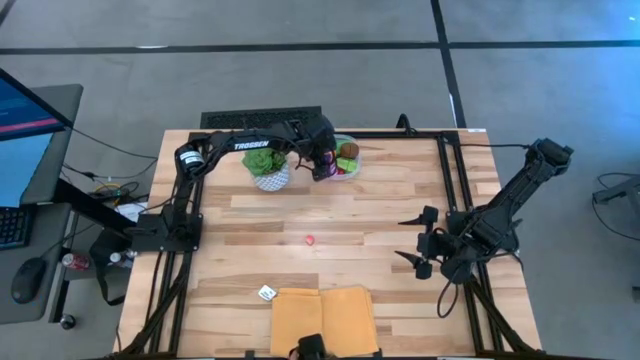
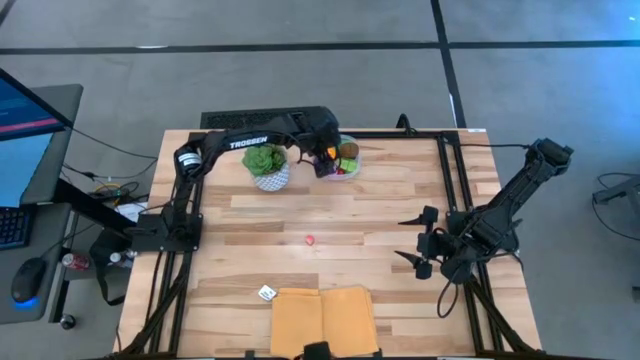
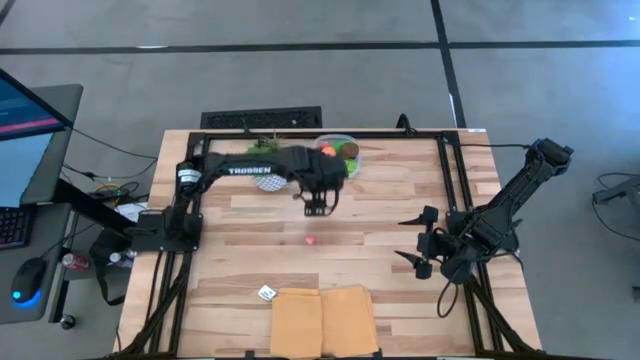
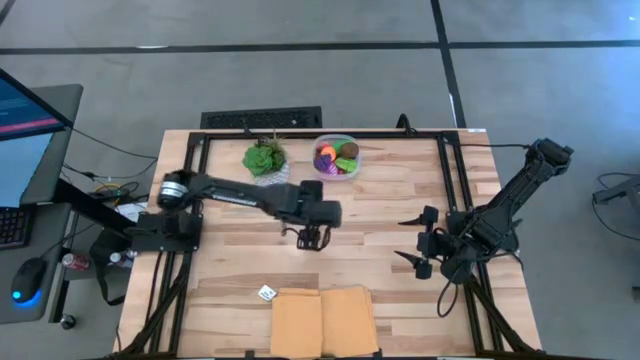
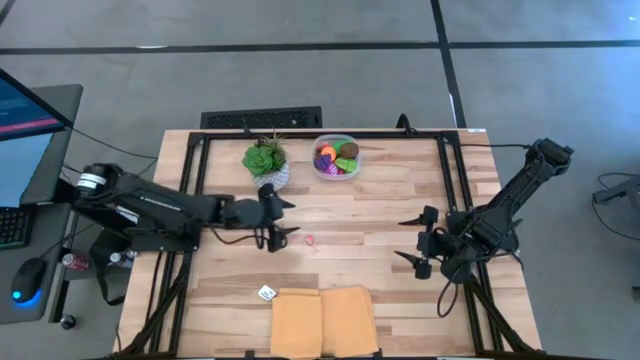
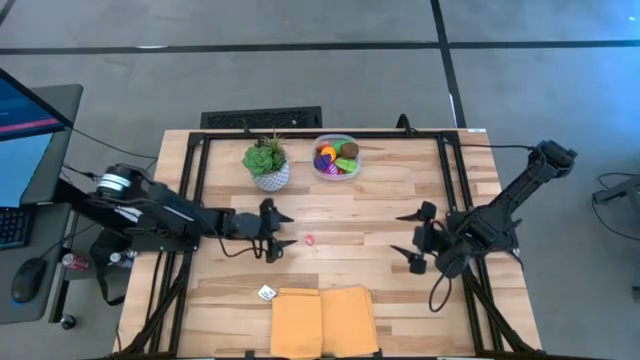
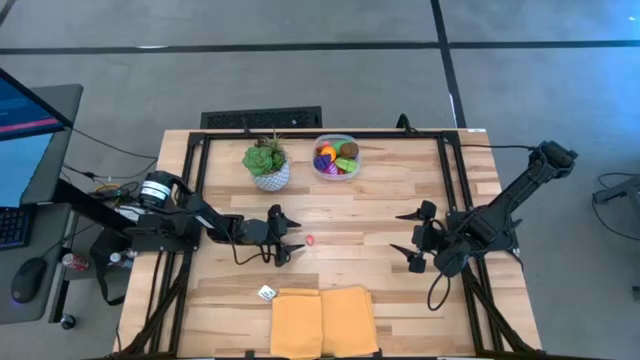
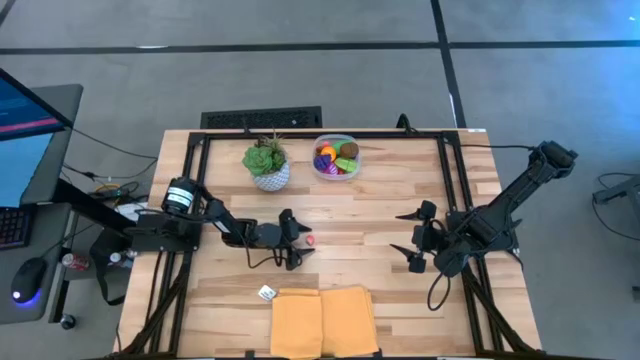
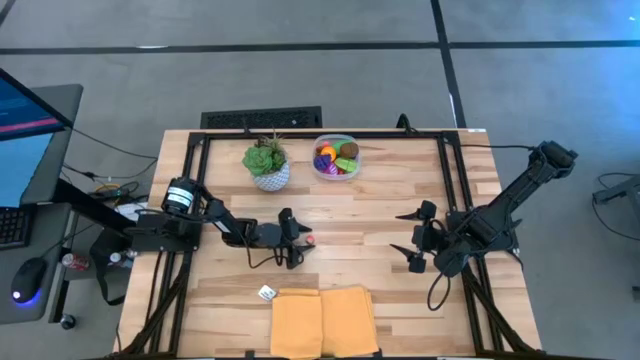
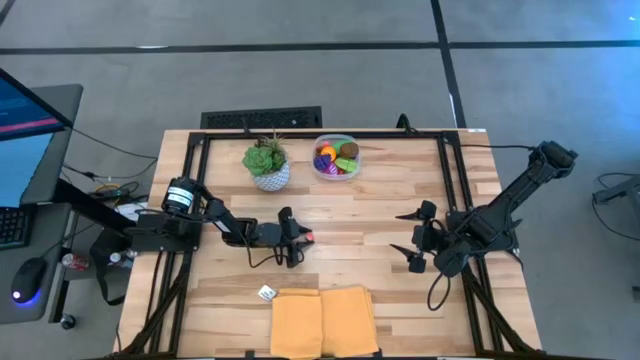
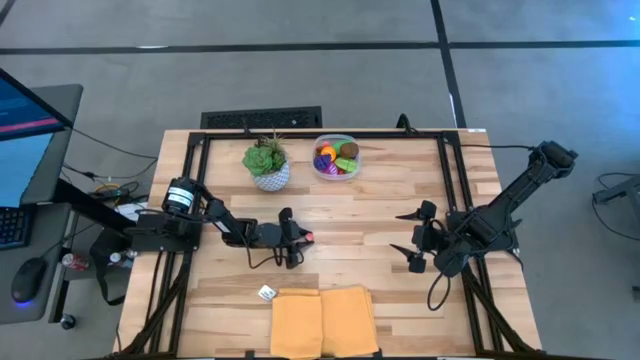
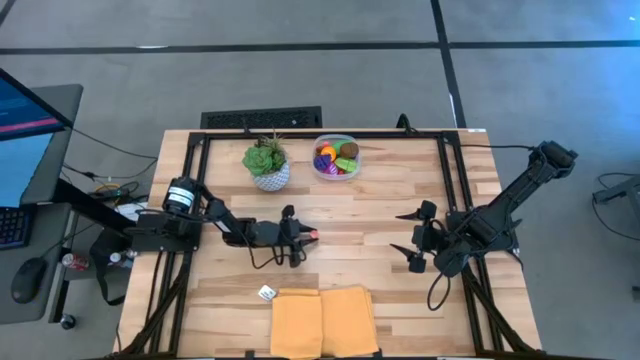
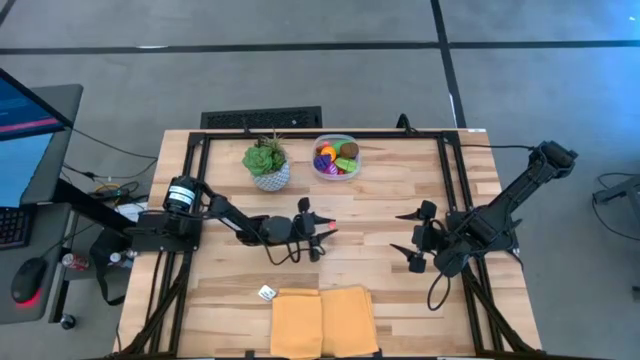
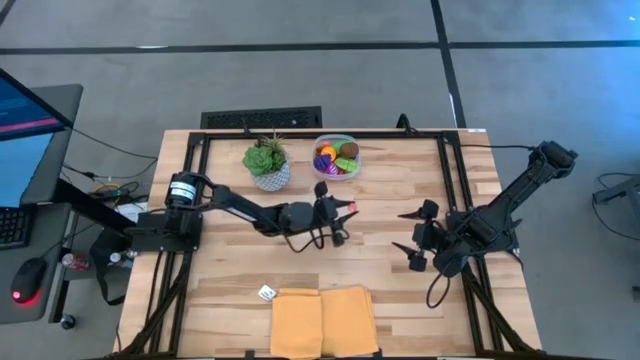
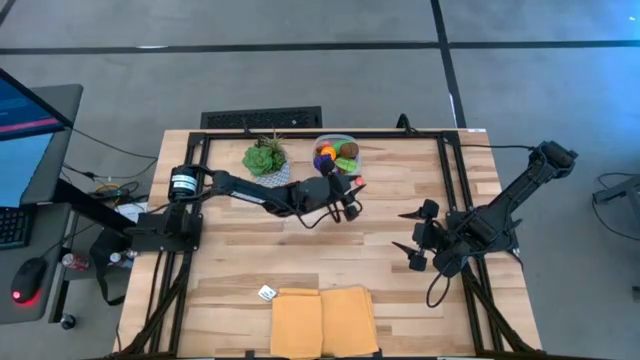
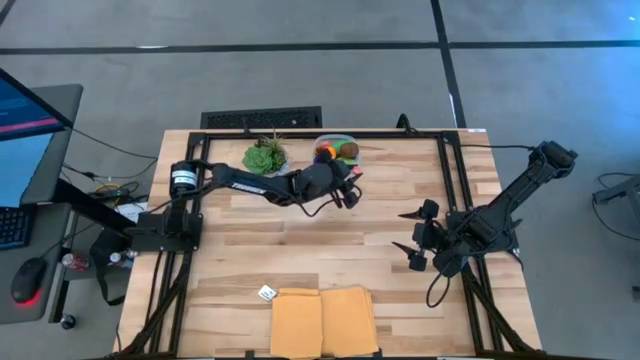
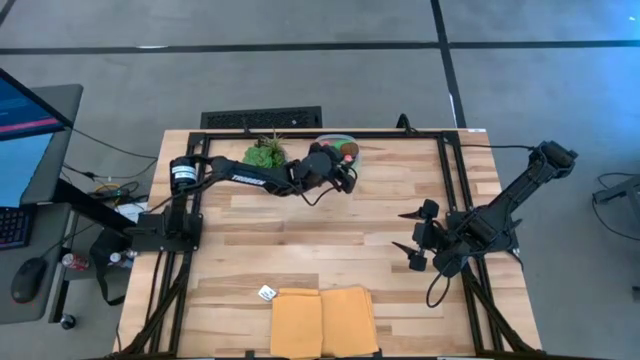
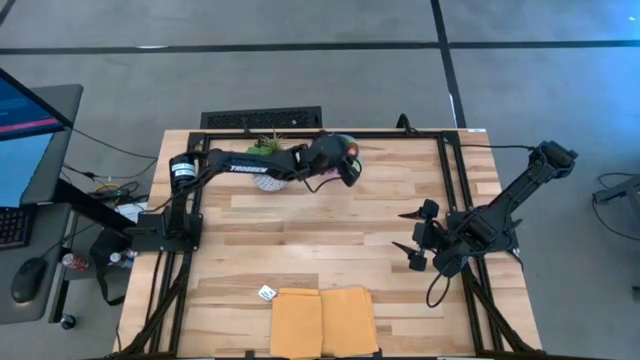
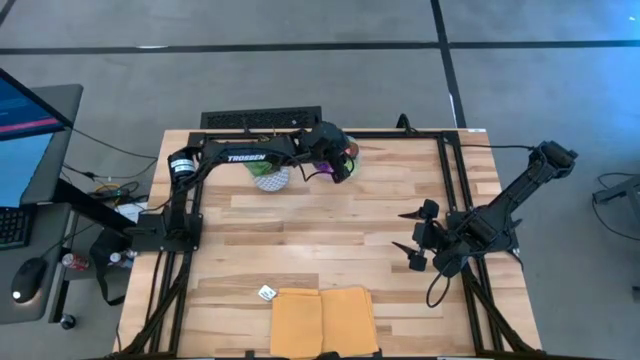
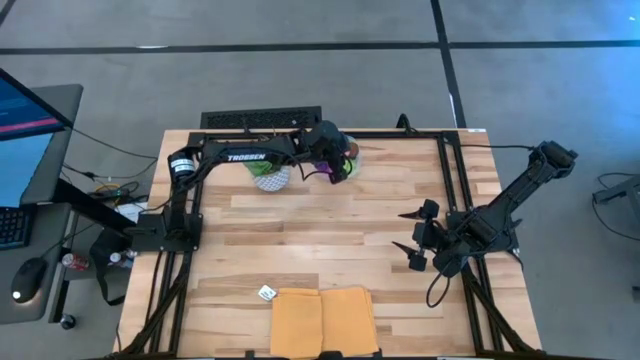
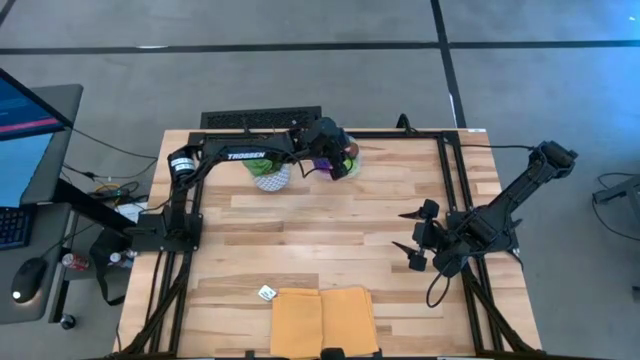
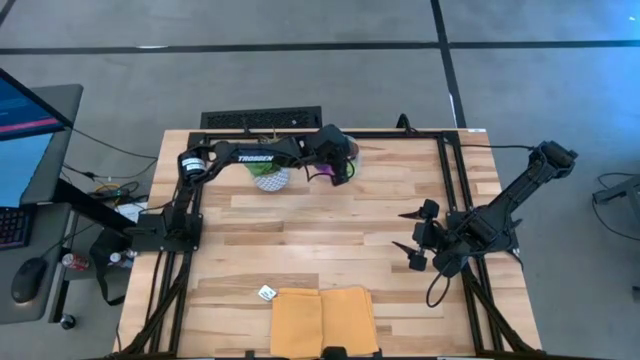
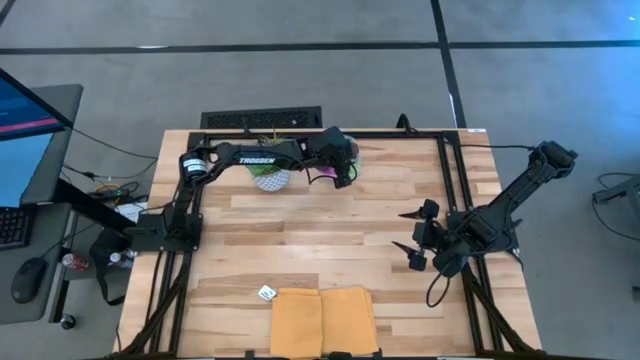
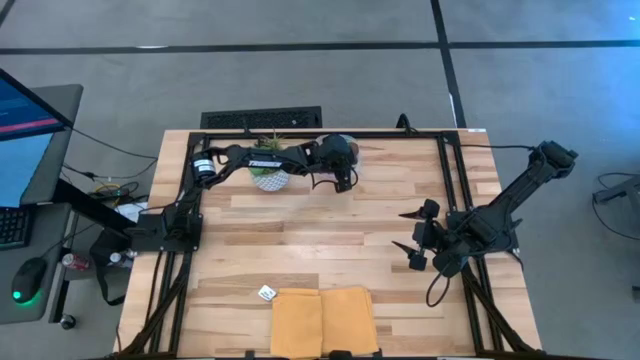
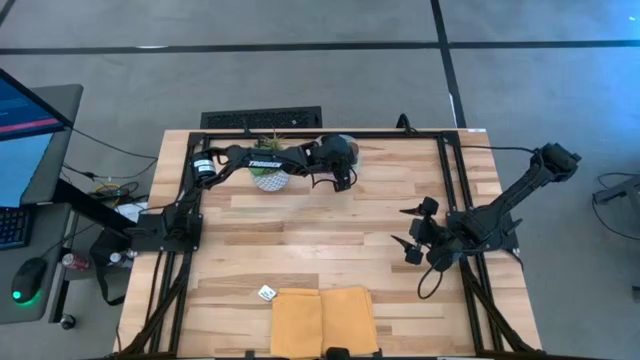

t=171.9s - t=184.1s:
Task: Pick and placing Produce into tupperware
Put the peach into the transparent bin

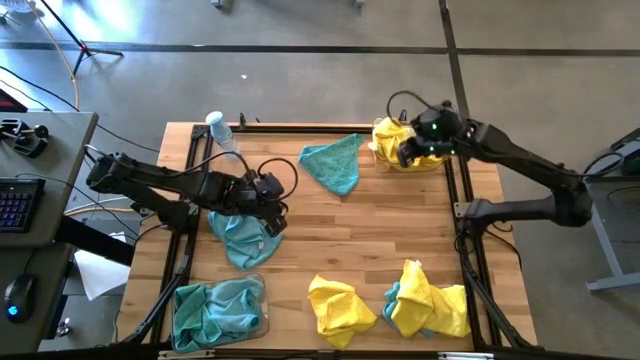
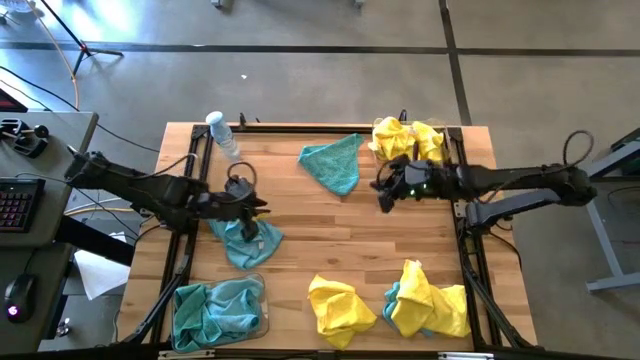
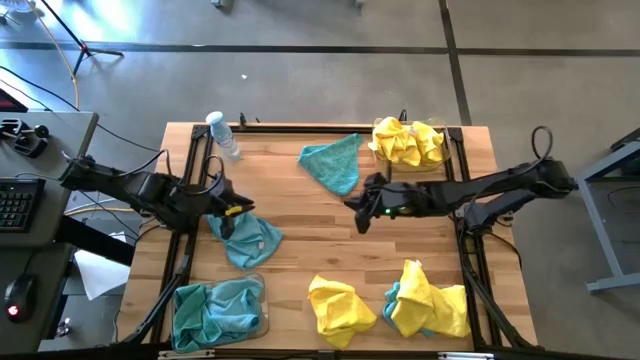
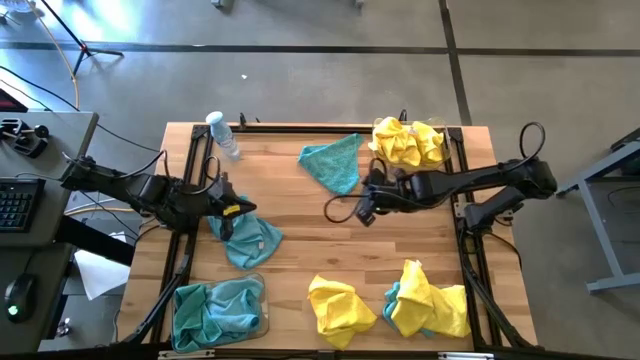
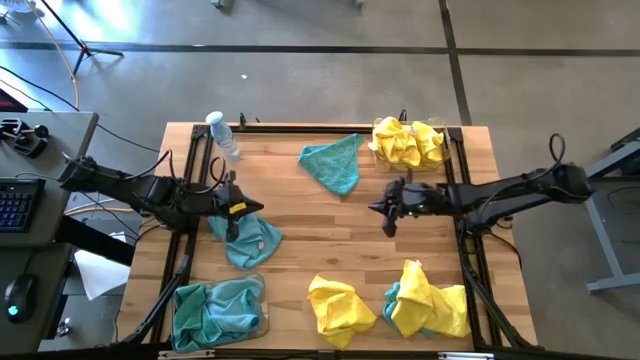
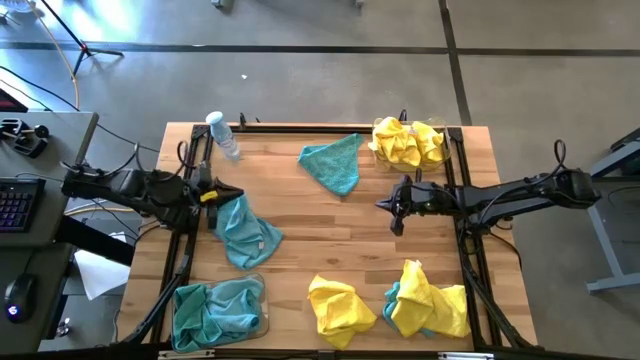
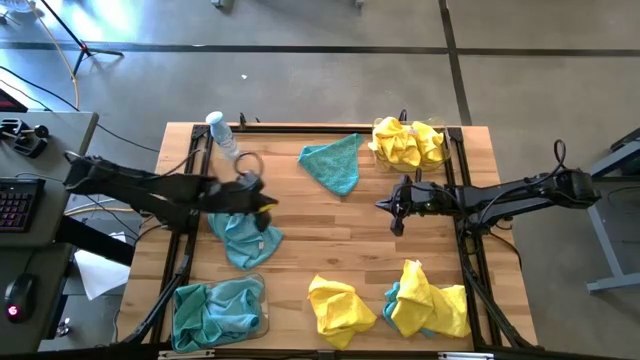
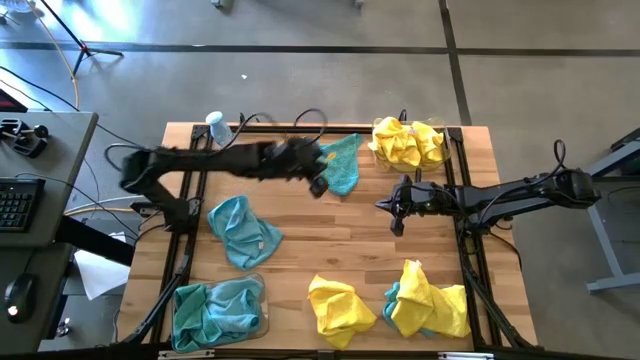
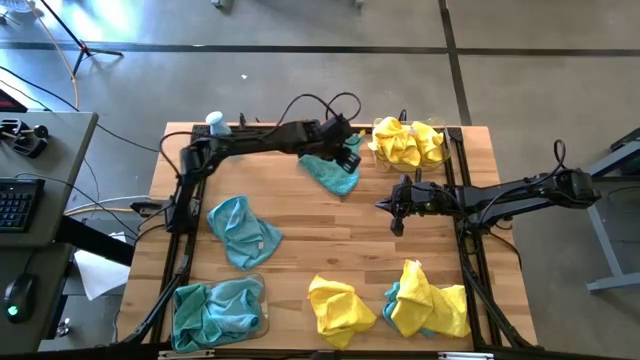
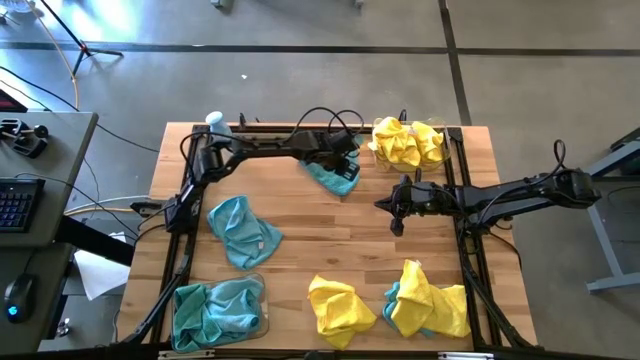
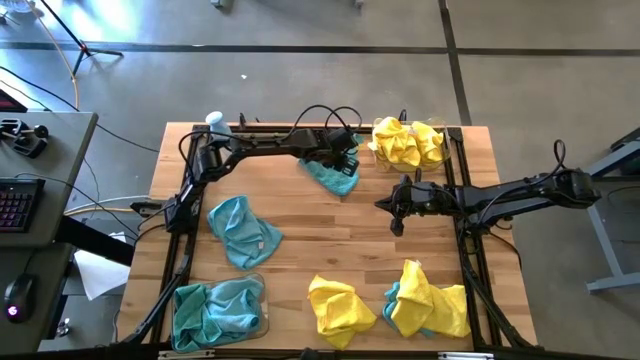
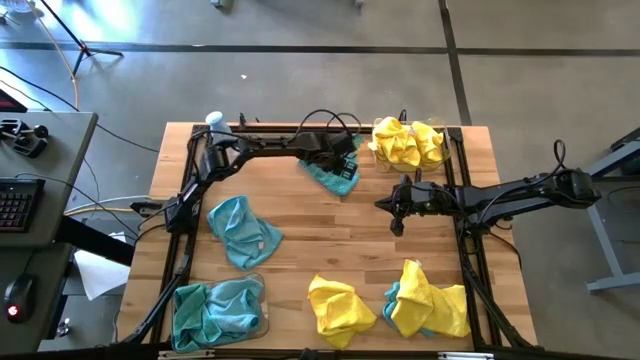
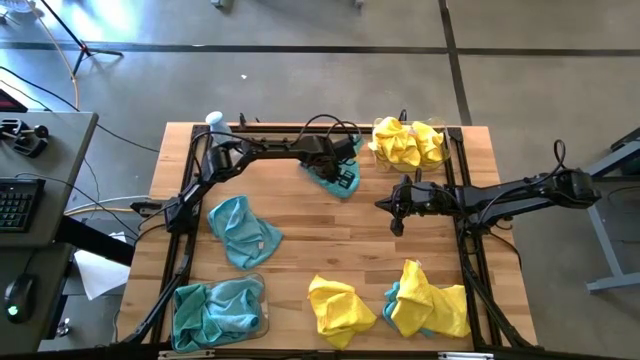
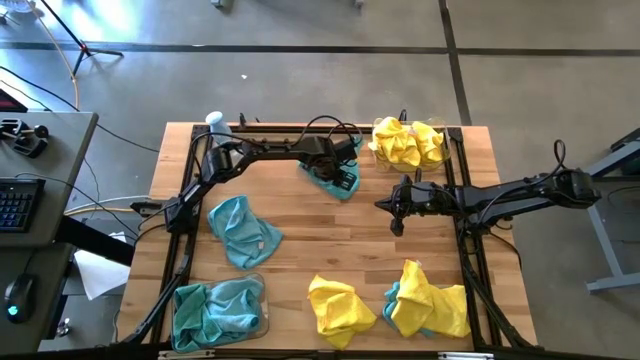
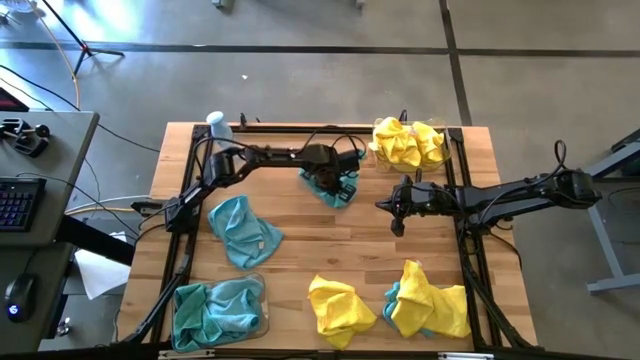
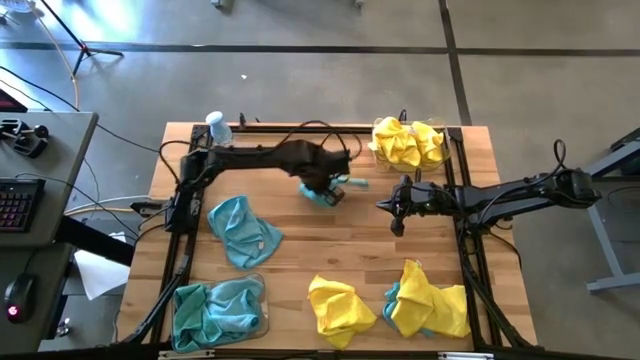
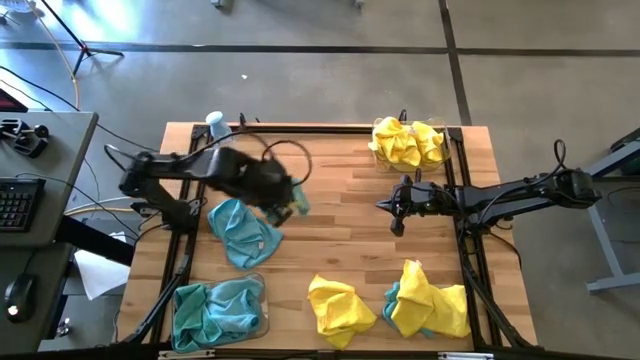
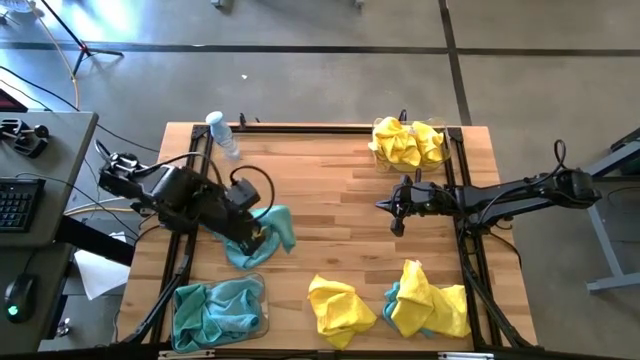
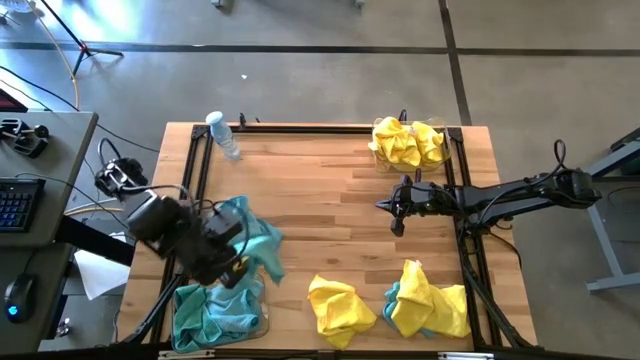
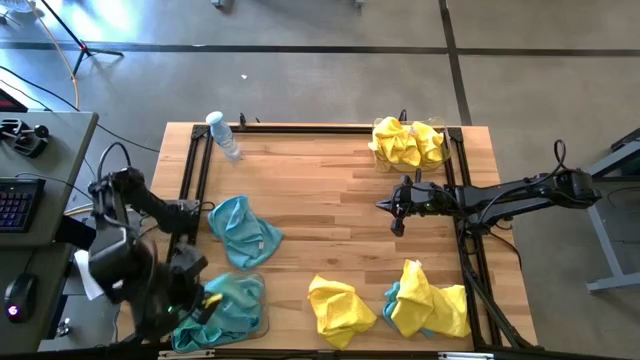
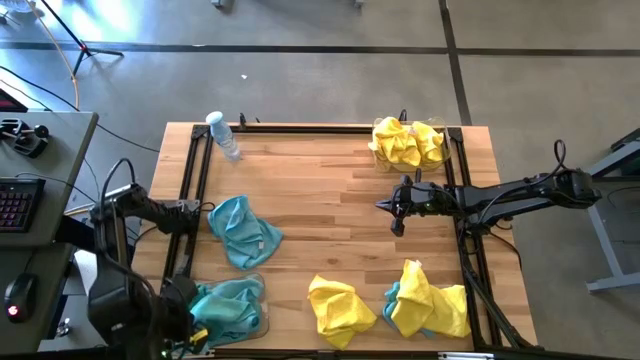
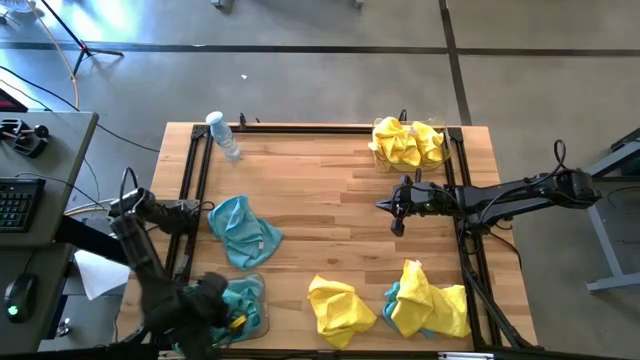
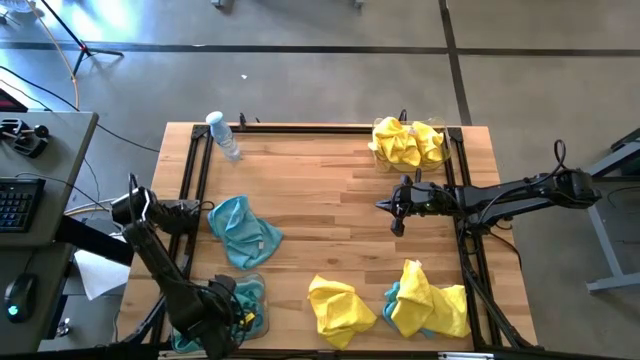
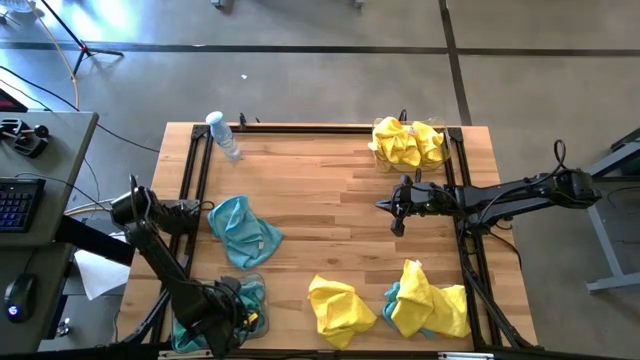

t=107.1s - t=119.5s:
Task: Sort microfiber towel by color & place in baskets
Put the blue microfiber towel into the bottom transparent bin
